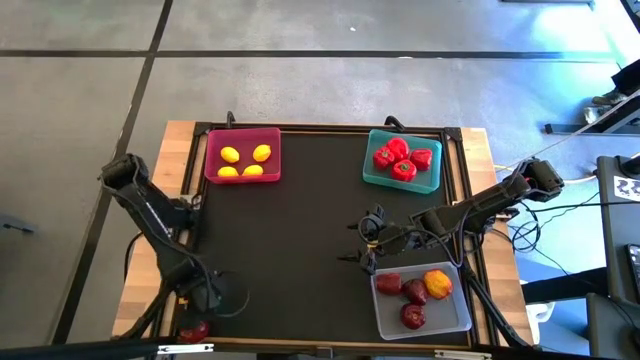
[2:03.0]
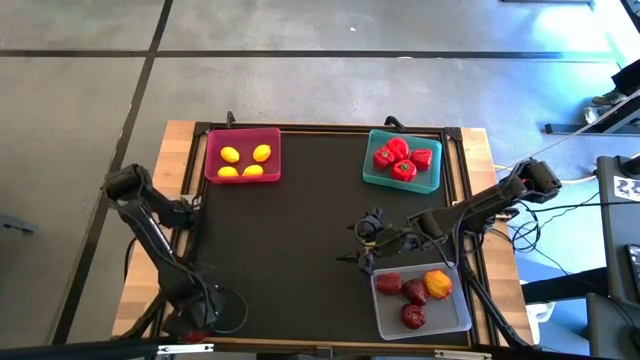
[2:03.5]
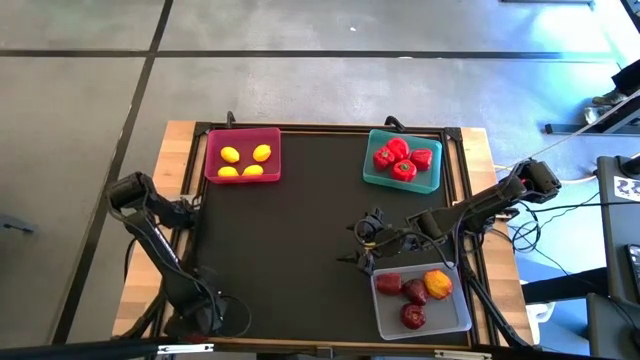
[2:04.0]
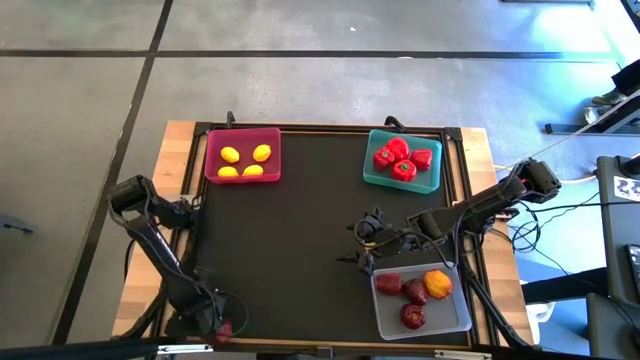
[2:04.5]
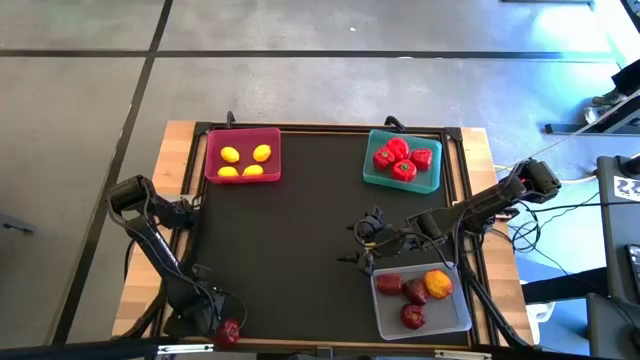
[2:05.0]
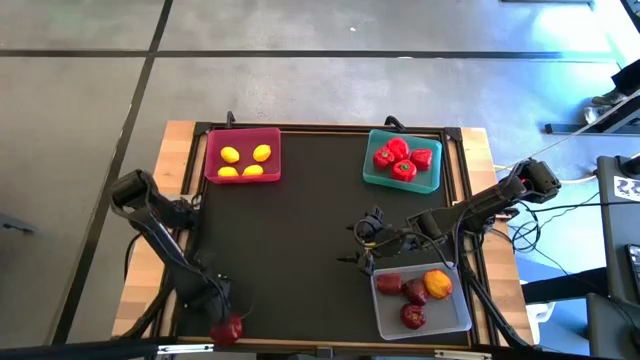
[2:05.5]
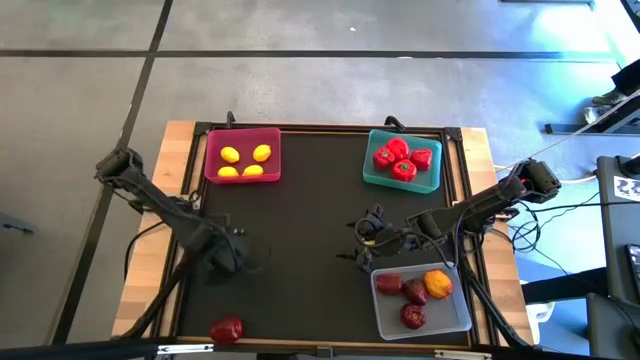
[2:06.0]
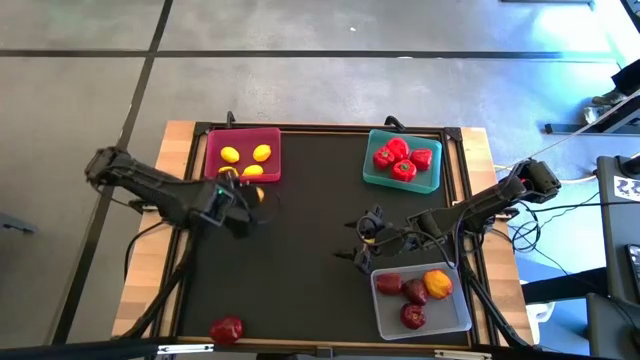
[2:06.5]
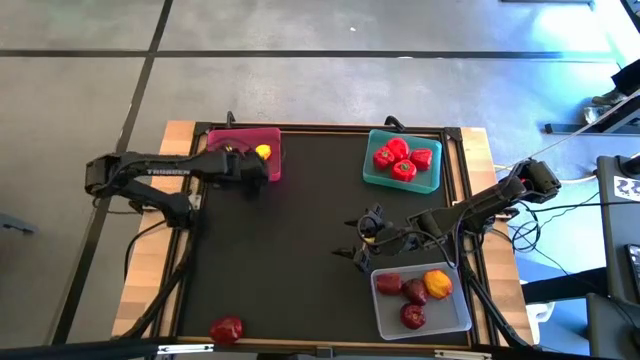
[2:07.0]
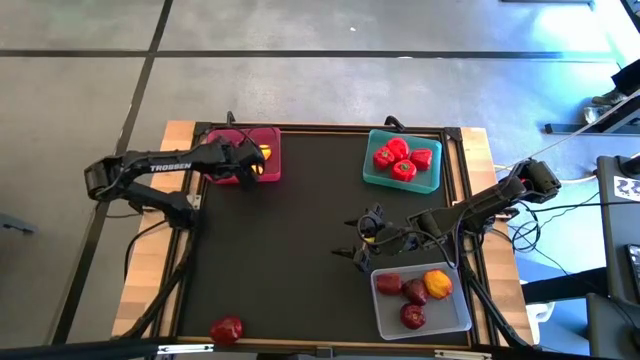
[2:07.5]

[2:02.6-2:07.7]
Task: Sort produce into baskets
Put the lemon into the pink bin

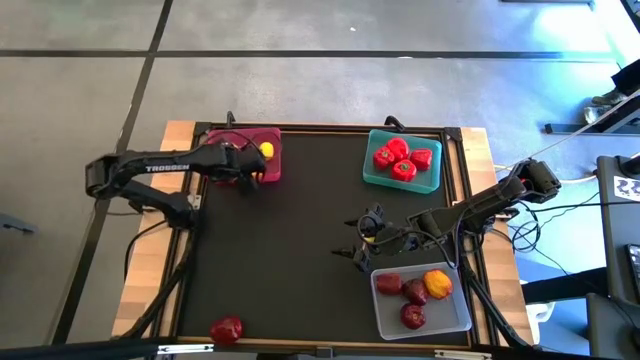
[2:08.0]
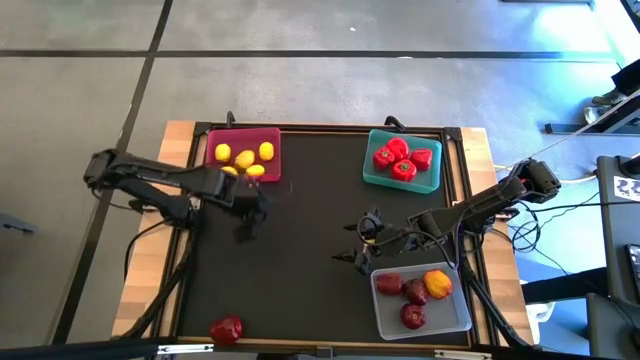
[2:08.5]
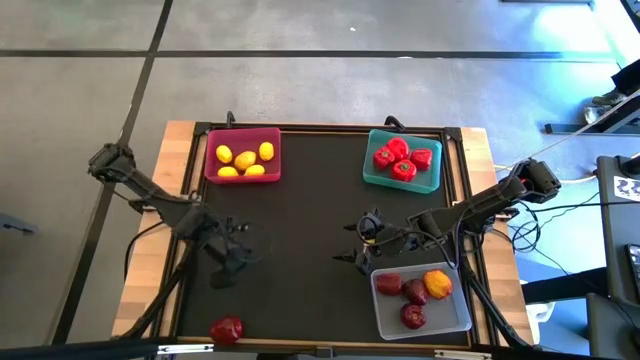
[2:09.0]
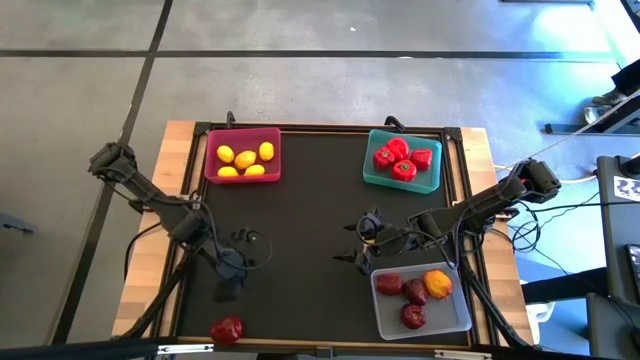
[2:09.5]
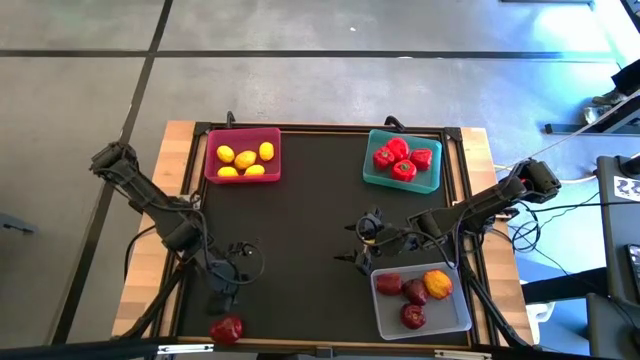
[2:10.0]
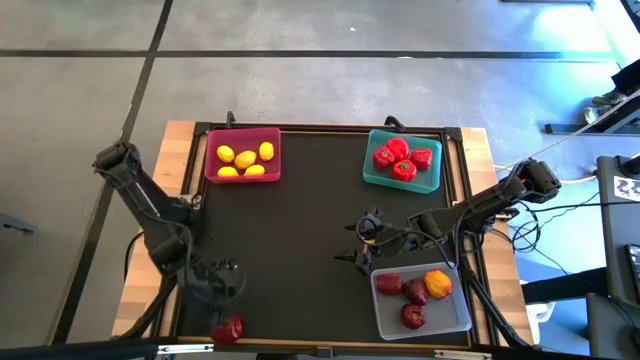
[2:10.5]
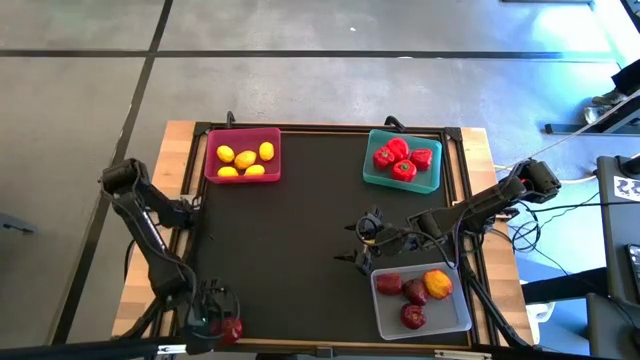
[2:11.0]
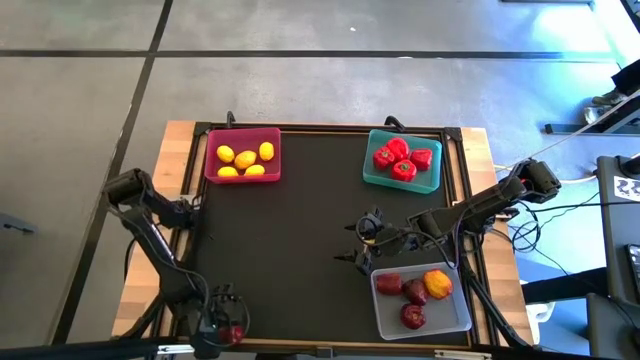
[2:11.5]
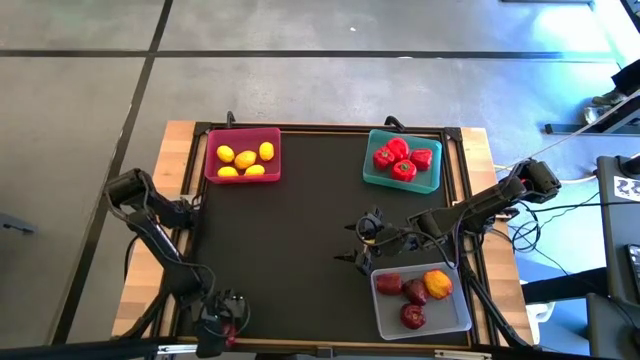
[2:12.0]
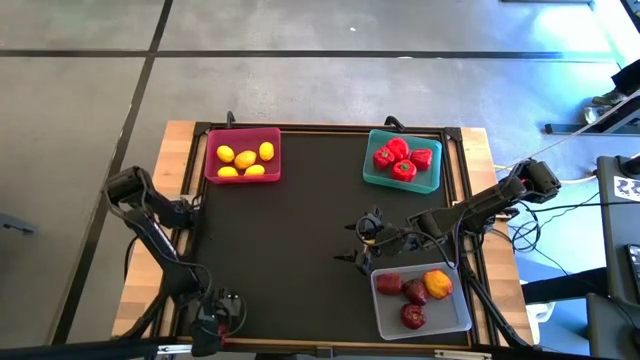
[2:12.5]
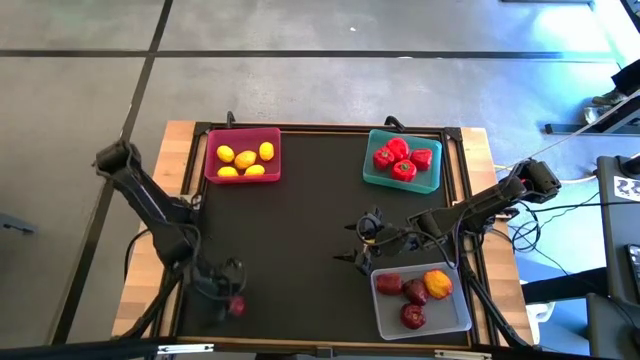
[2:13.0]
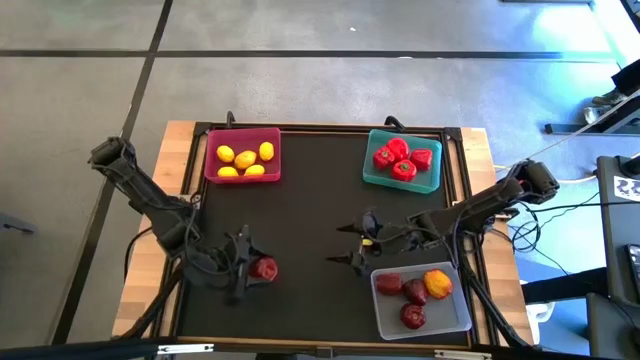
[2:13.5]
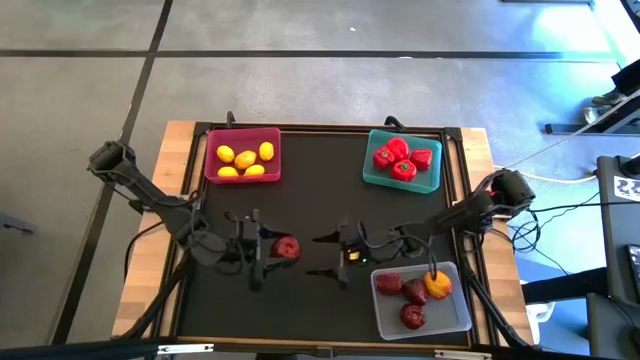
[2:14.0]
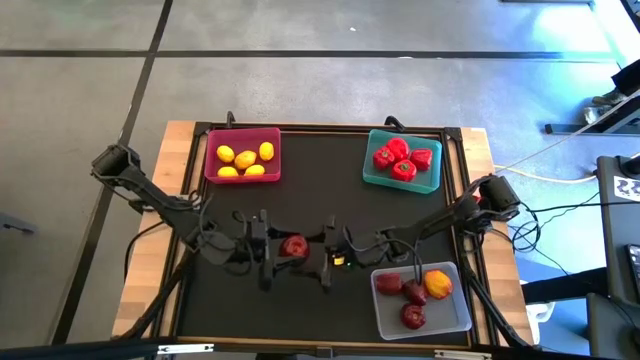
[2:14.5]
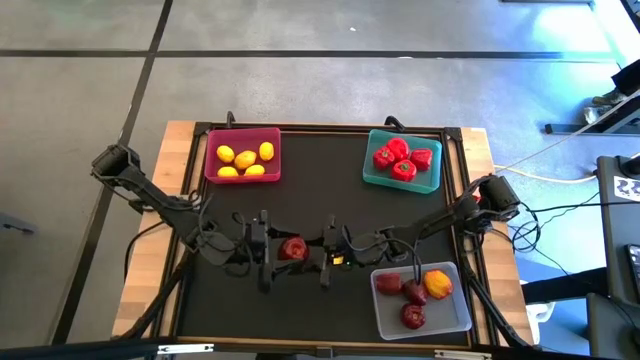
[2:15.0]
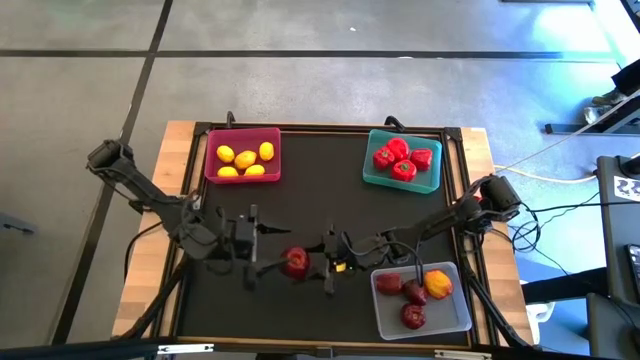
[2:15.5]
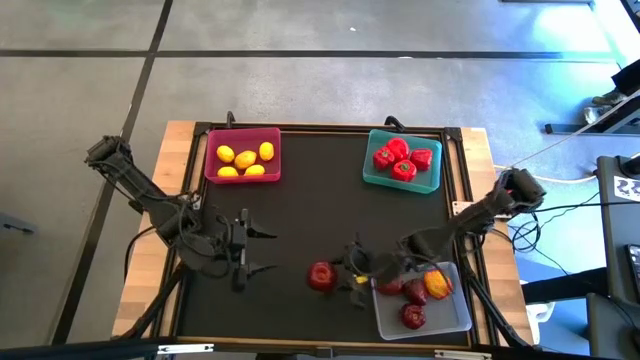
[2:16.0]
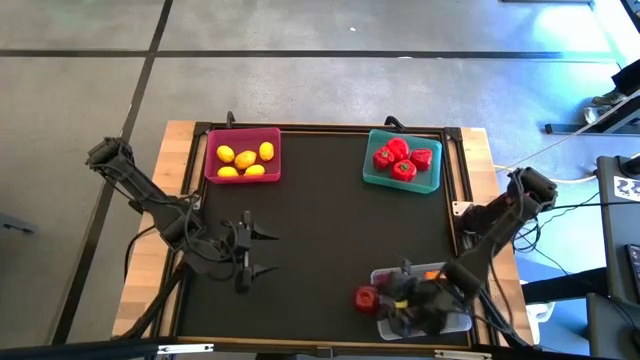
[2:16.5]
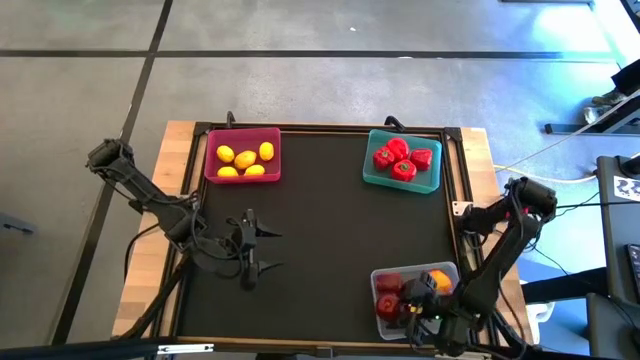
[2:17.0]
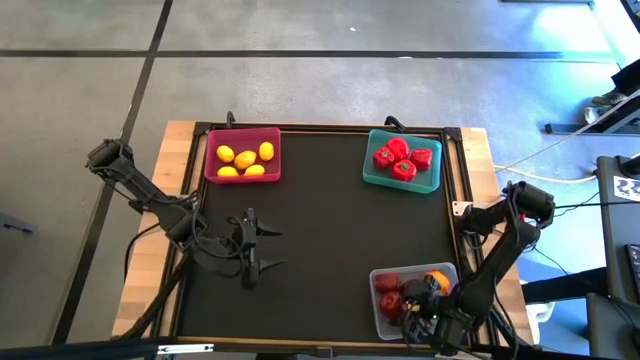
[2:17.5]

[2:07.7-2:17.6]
Put the apple into the transparent bin

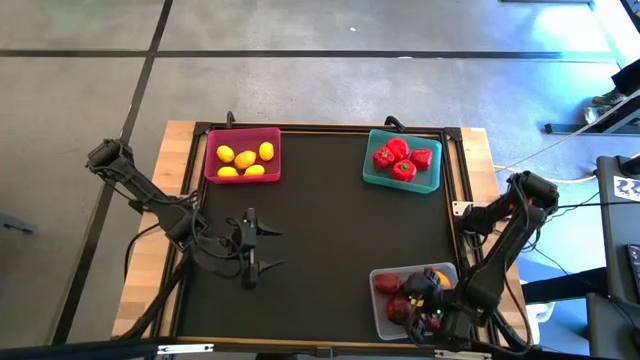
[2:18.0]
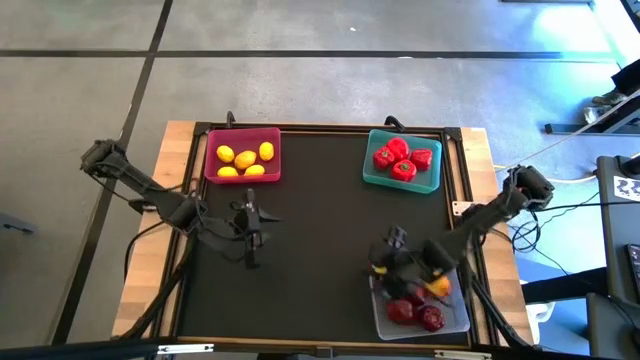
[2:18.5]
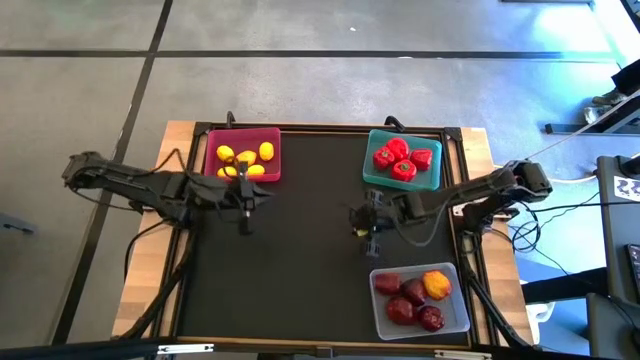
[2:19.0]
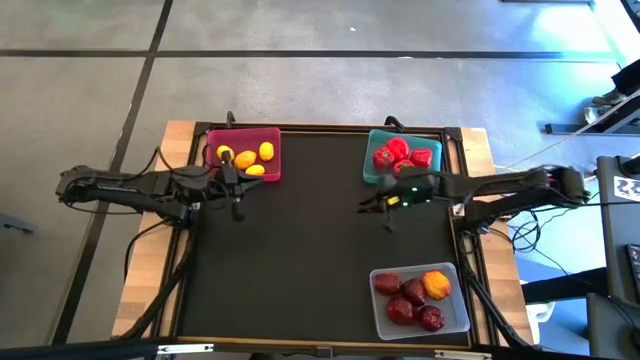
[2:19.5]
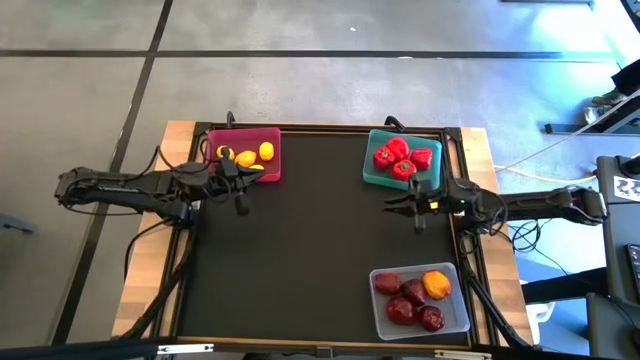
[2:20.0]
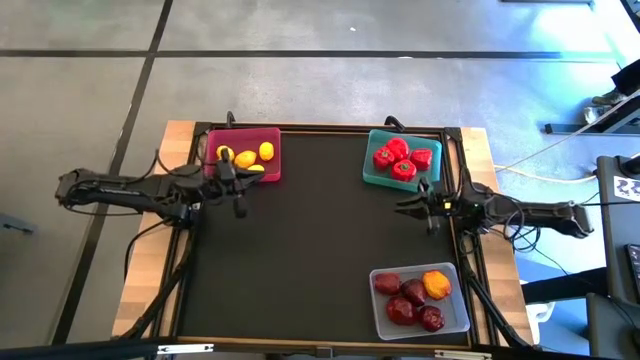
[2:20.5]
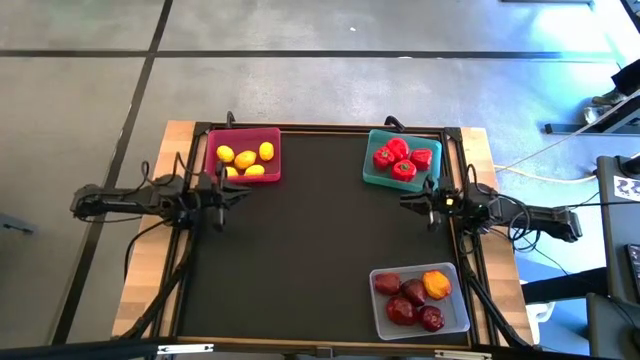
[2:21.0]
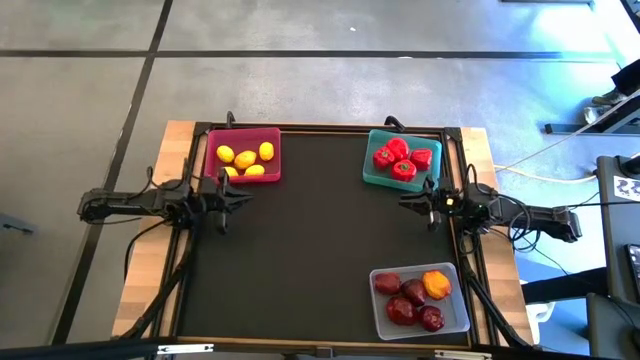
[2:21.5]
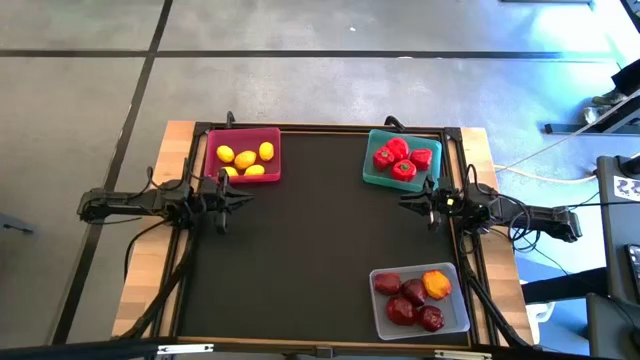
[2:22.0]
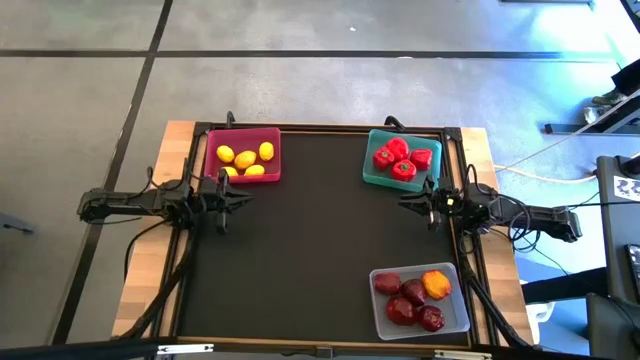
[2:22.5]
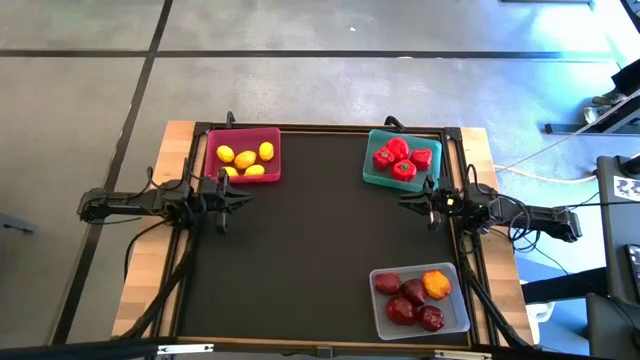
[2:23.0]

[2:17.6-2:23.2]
Return to Home Position

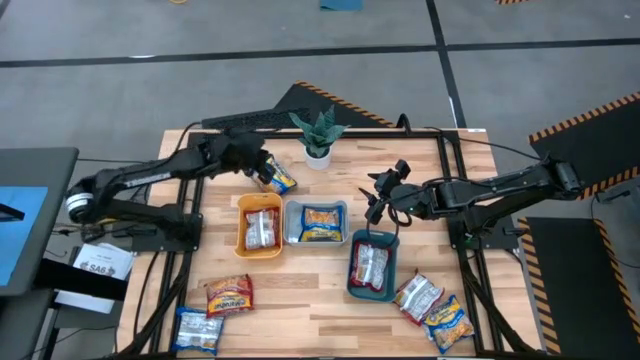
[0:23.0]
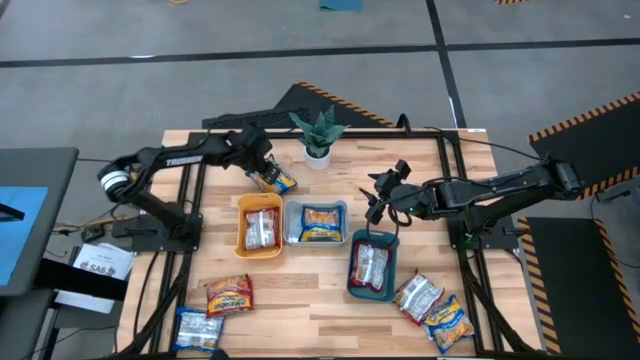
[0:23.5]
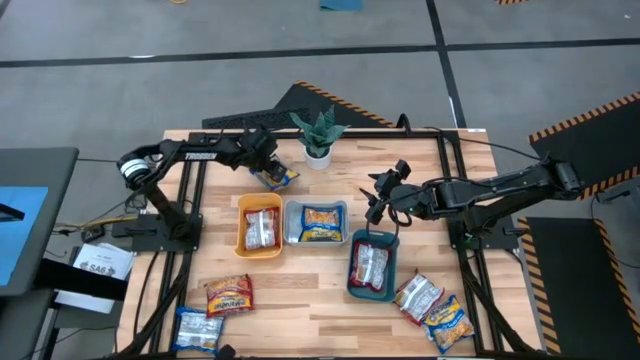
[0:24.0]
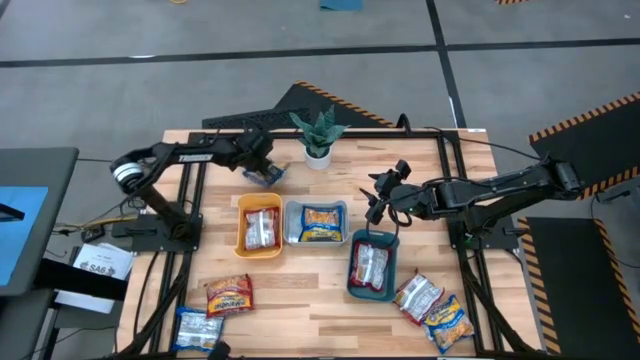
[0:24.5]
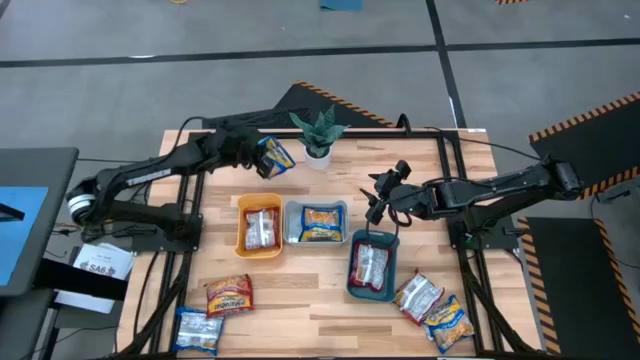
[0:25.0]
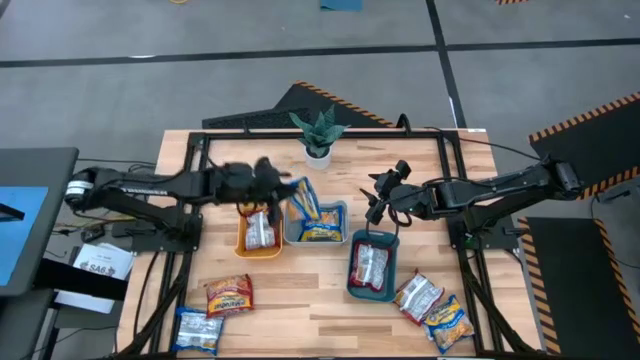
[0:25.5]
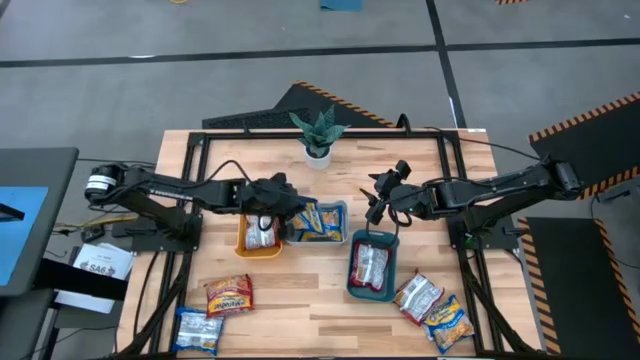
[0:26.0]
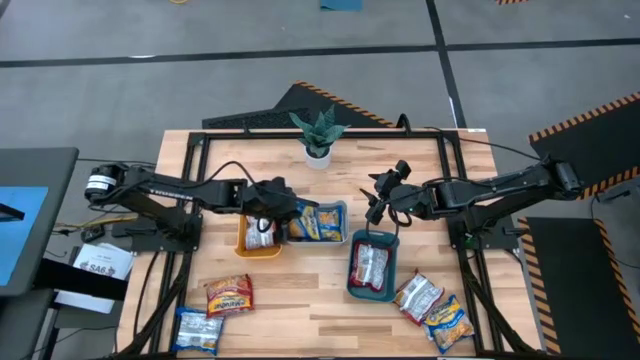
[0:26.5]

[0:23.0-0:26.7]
Task: Sort Maruchan noodles
Put the top left blue noodle pack into the gray bin
